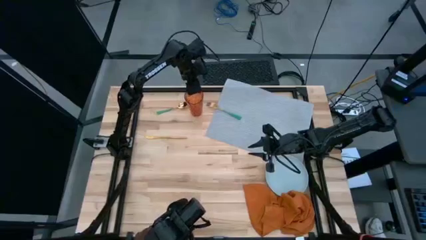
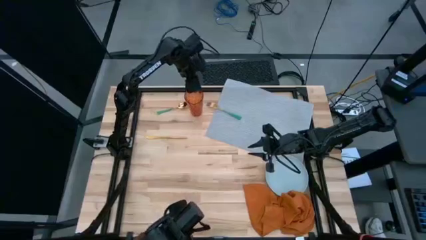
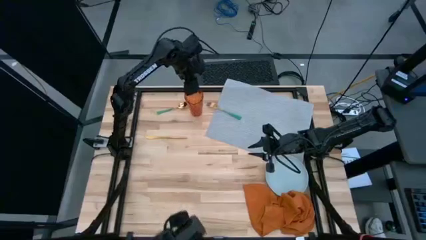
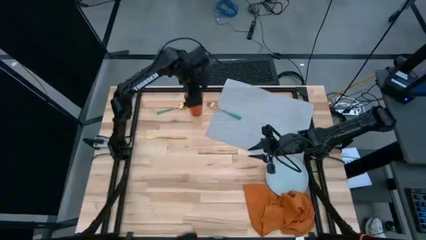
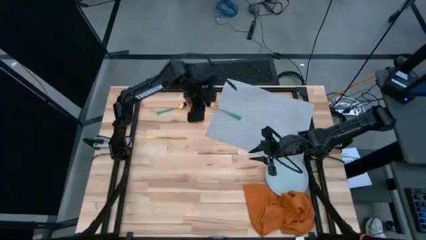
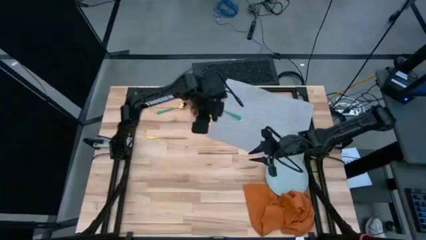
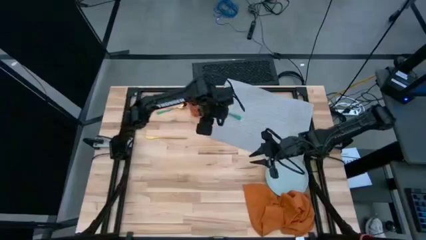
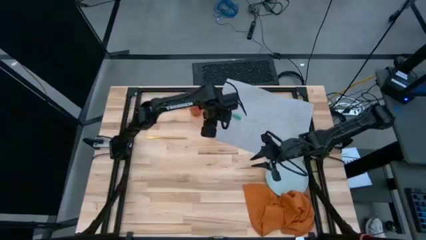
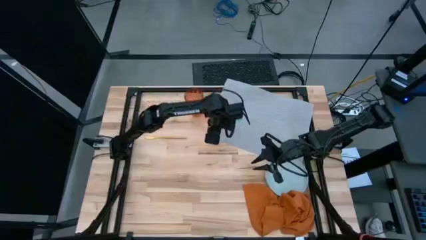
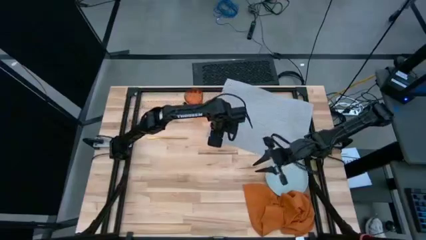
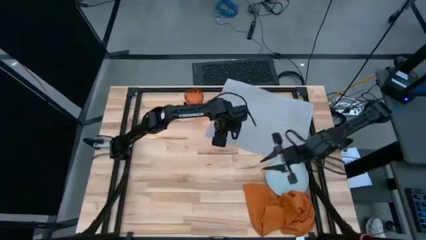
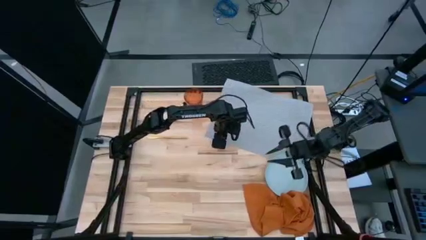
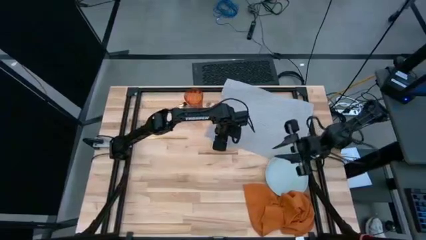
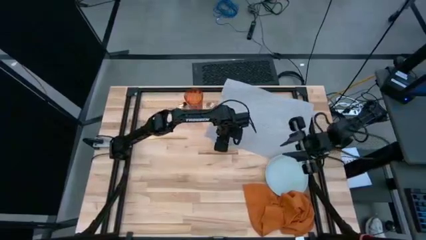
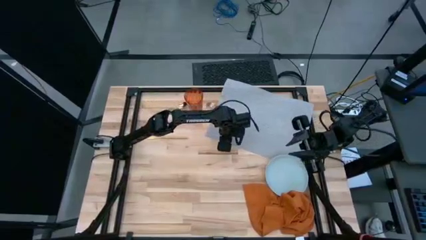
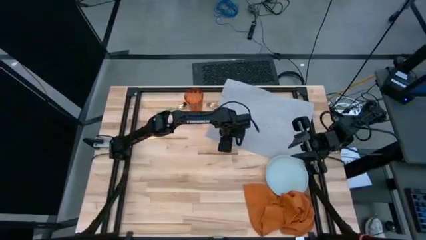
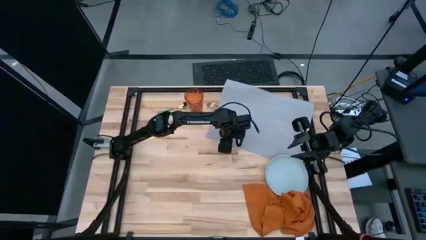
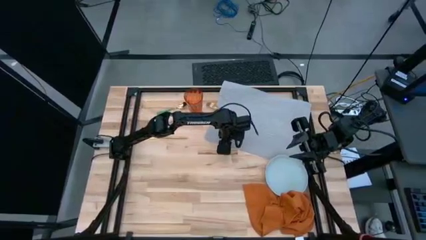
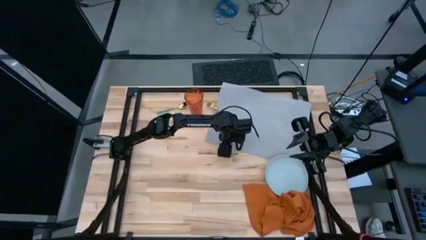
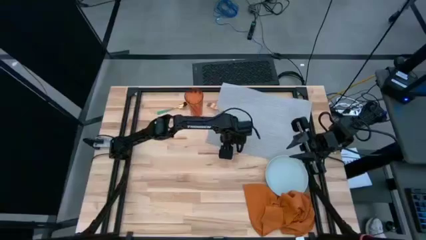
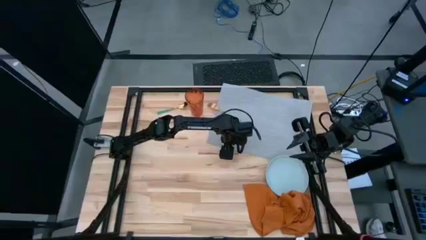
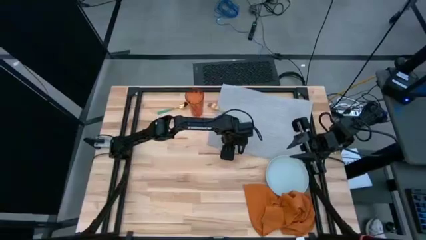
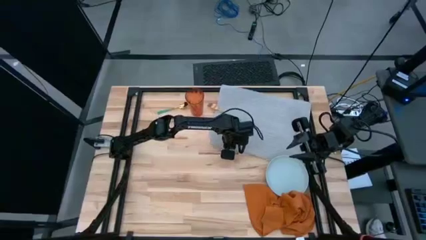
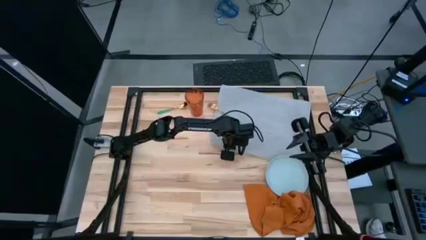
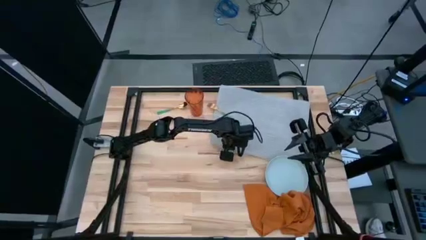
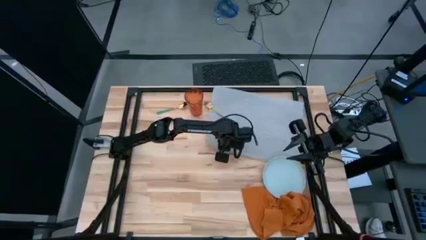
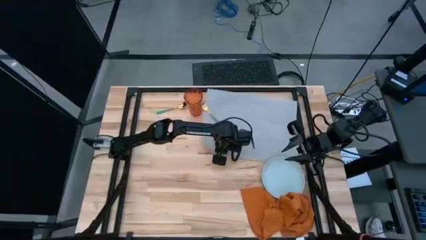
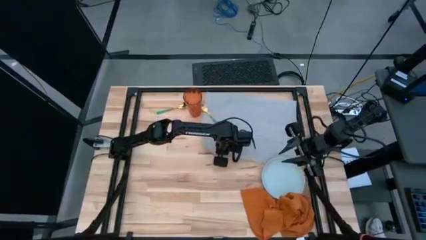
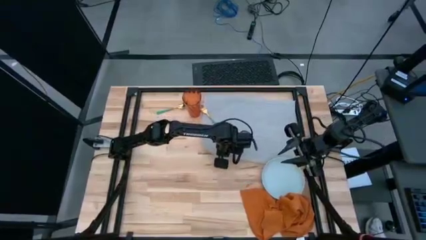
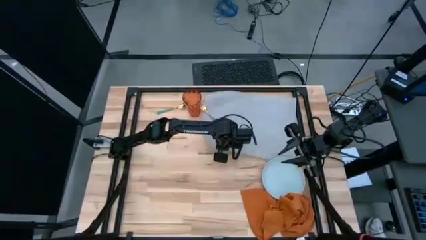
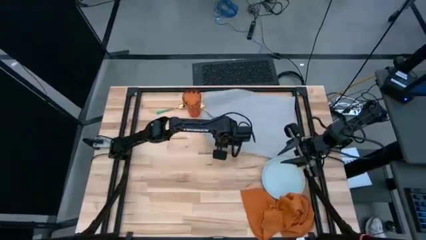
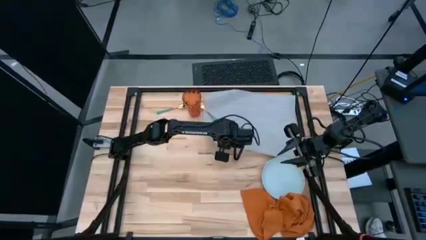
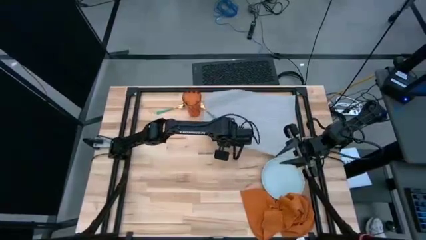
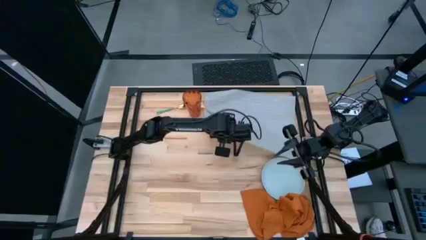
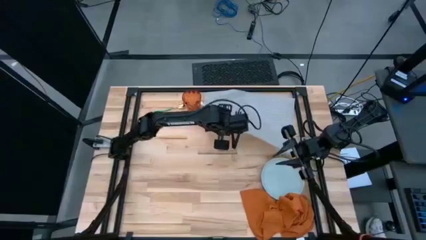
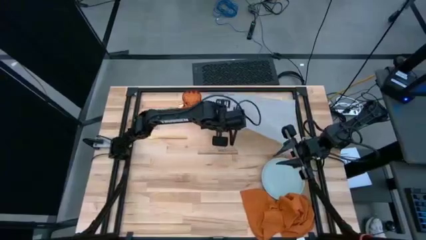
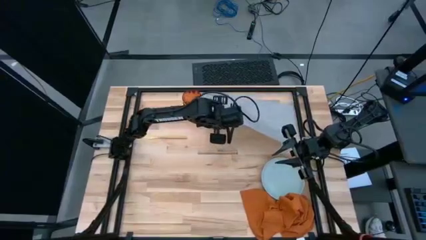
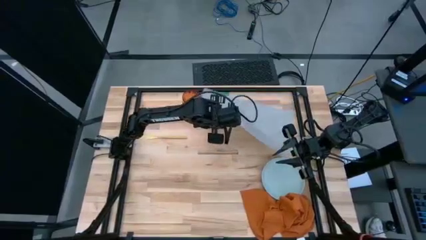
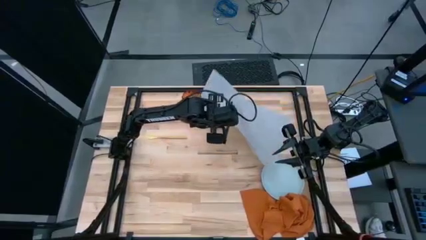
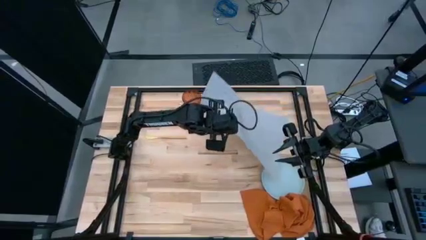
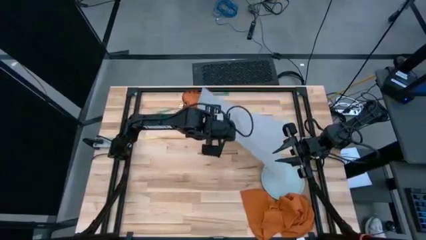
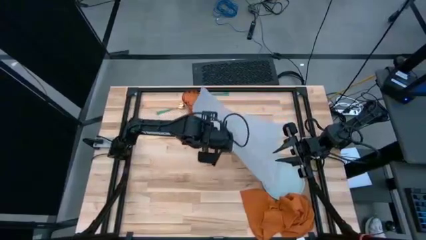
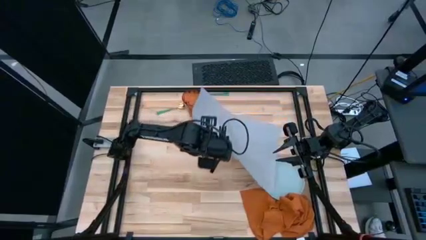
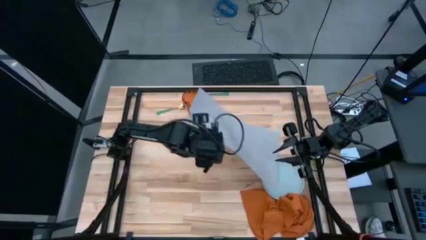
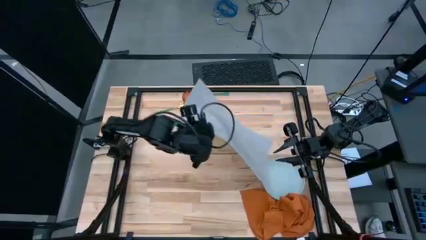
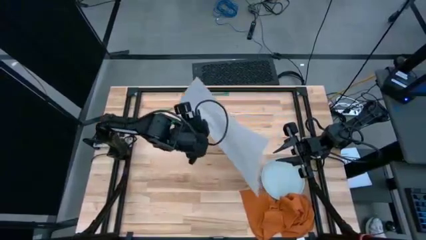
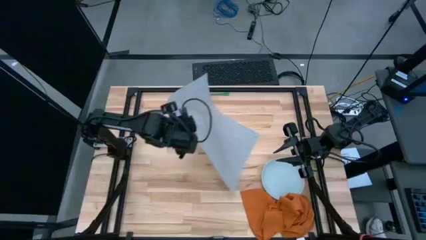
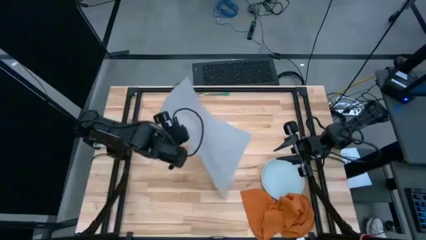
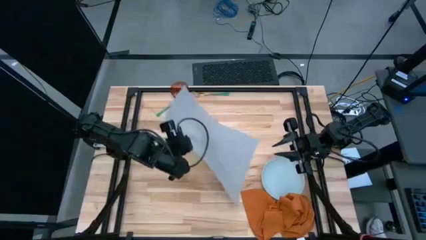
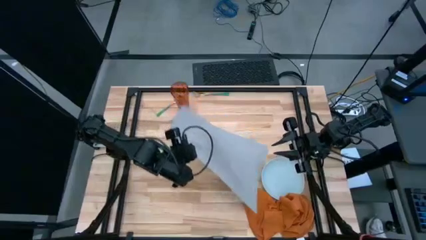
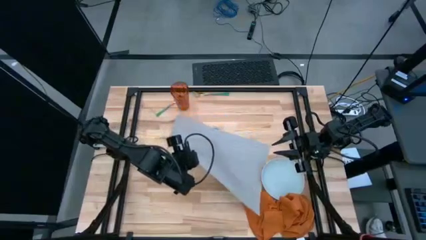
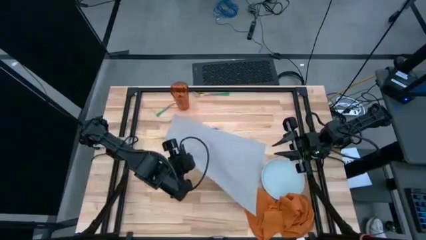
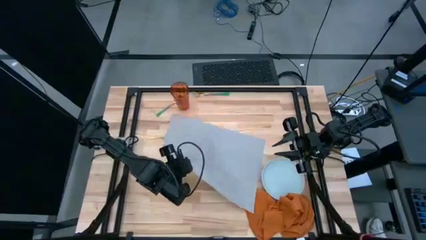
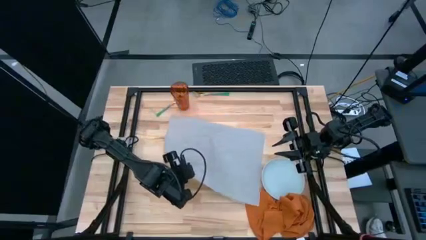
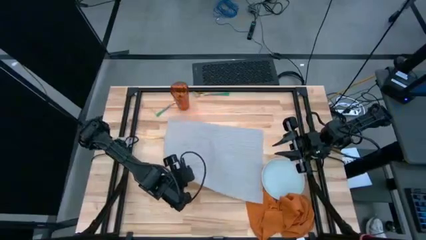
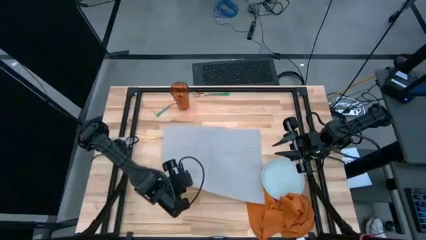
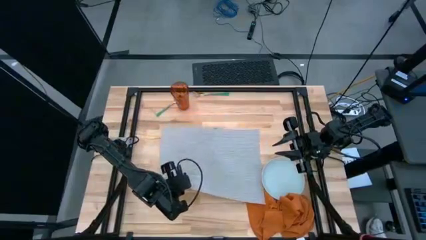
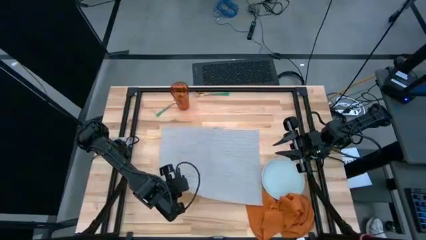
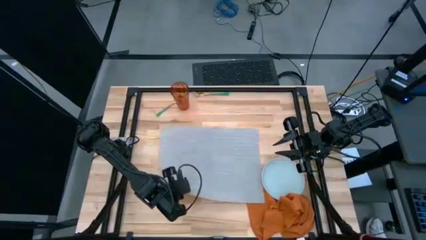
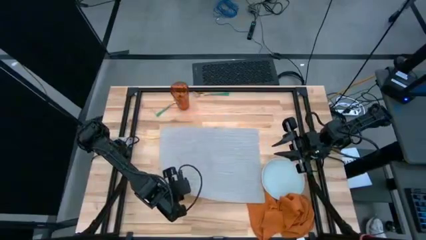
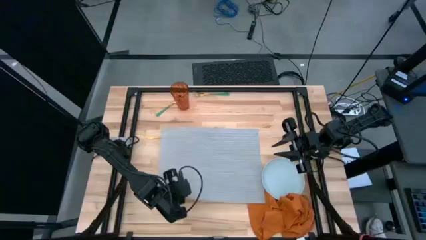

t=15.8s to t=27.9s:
Task: Set table place
Put the gray table mat on the center of the table

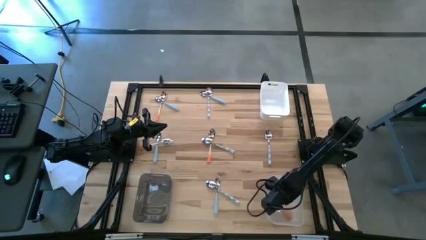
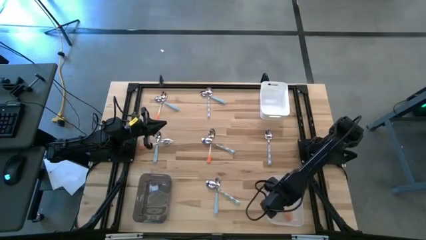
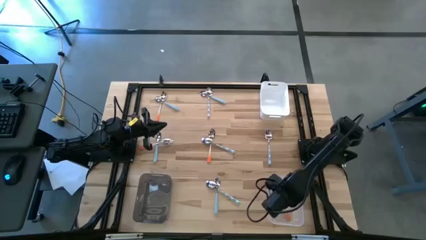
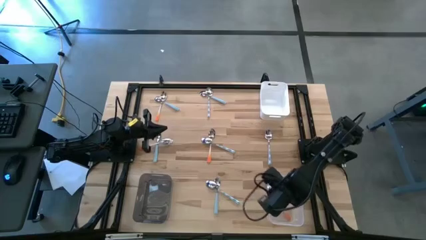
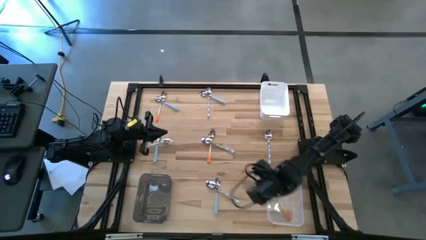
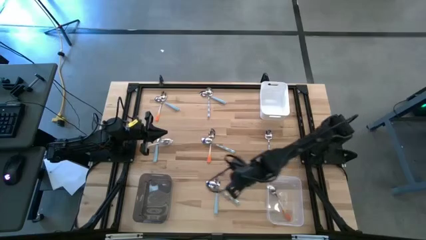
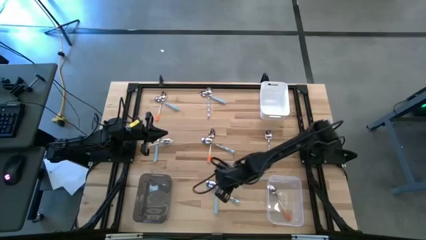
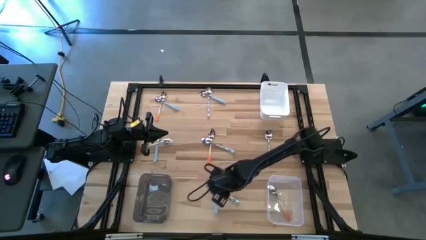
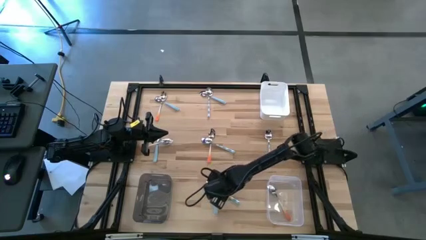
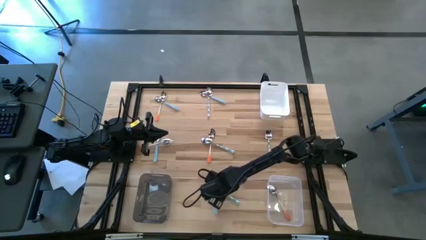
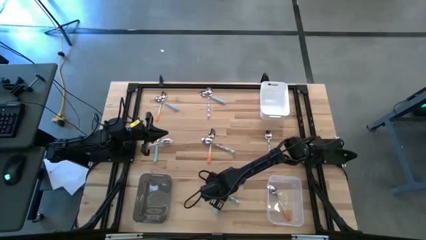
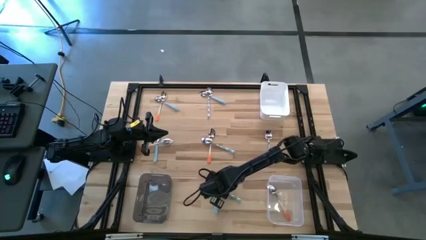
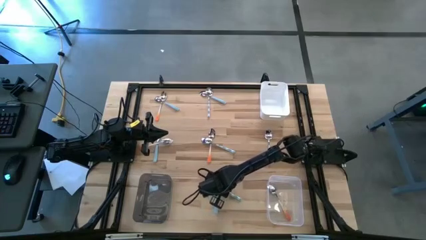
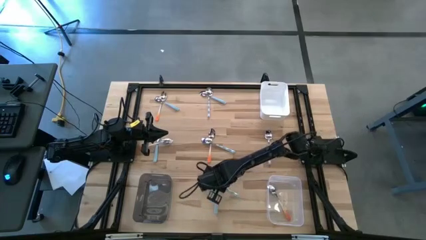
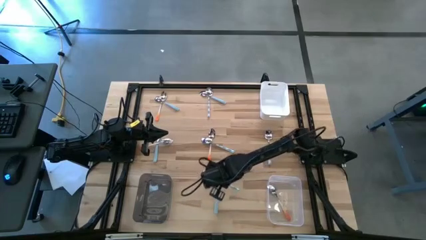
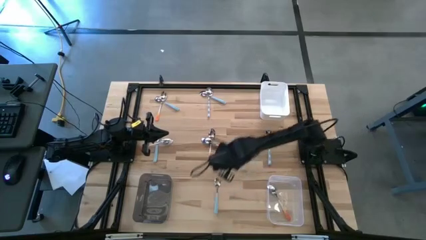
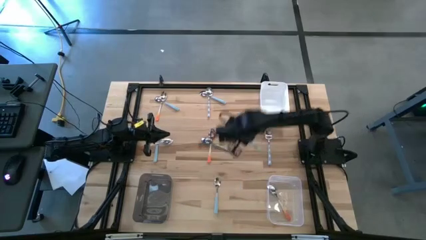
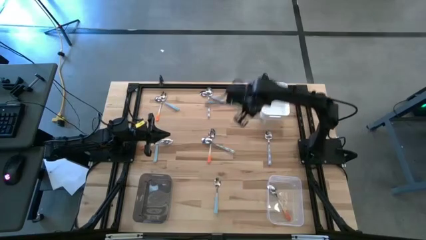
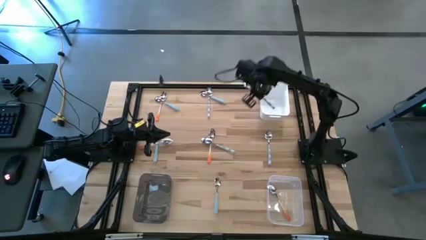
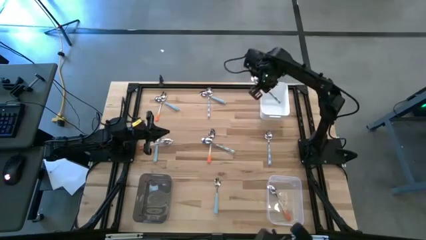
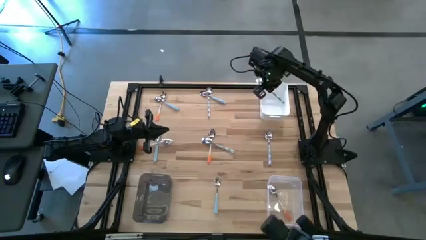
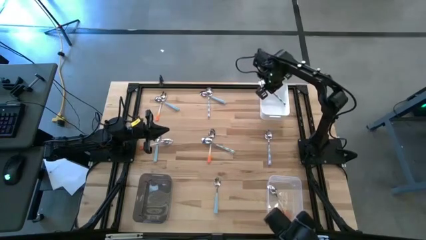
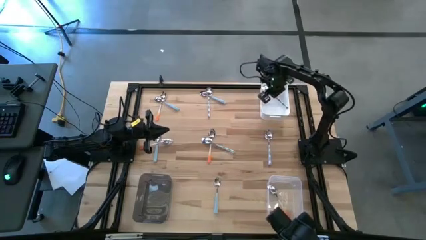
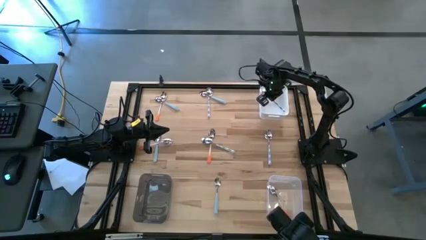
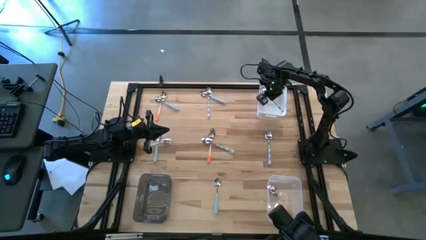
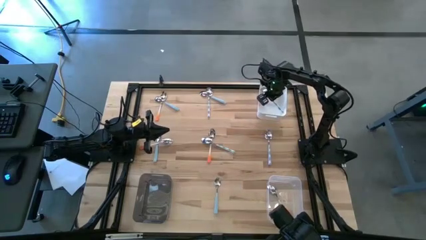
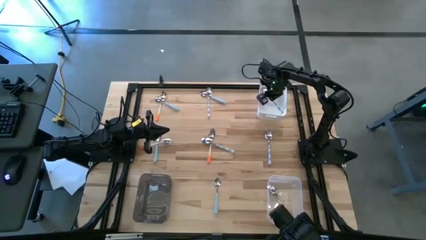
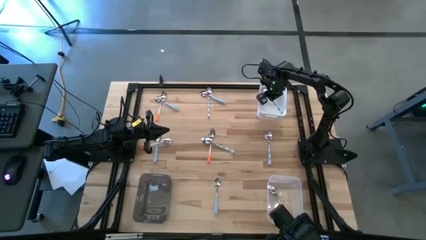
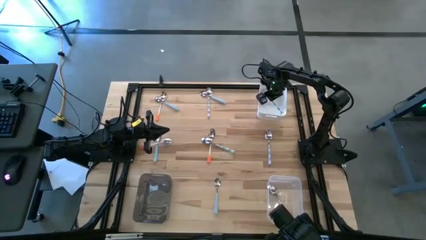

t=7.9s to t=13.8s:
Task: Sort silverware by color (type)
Put the white spoon into the white bin
